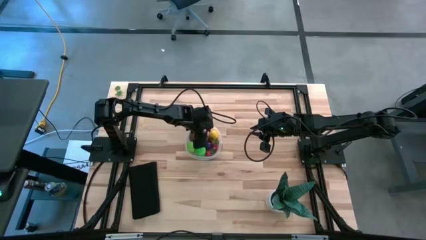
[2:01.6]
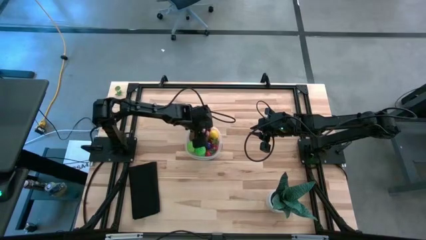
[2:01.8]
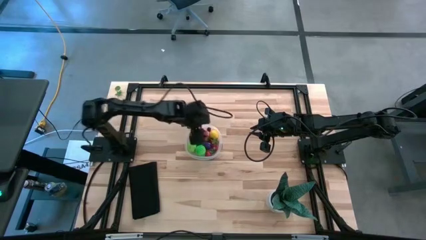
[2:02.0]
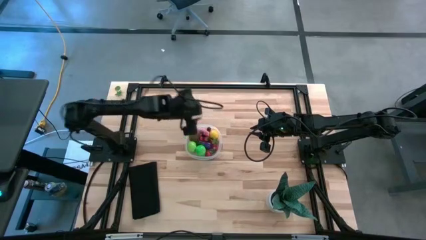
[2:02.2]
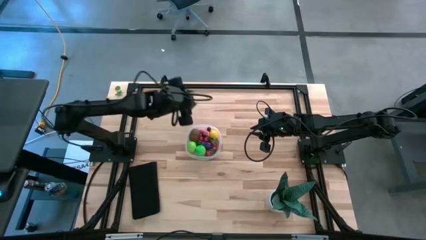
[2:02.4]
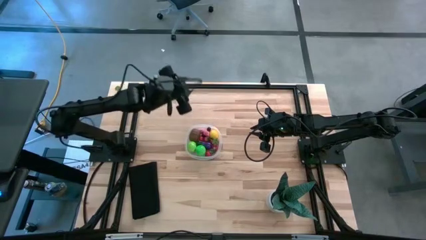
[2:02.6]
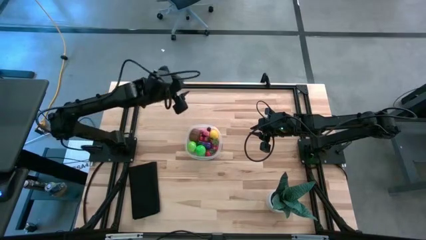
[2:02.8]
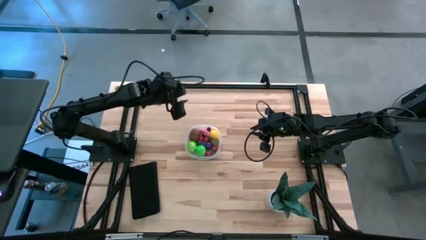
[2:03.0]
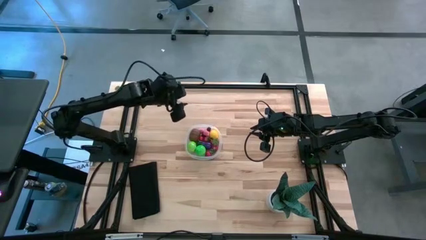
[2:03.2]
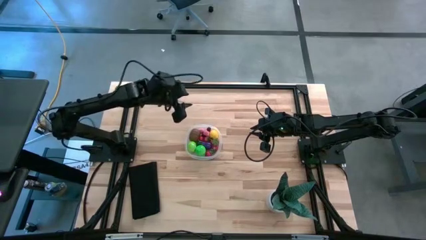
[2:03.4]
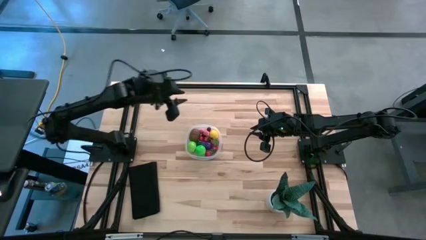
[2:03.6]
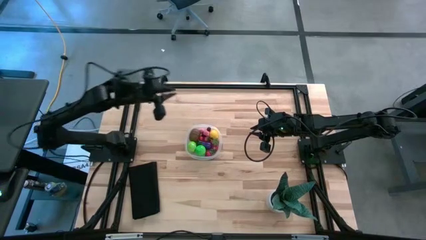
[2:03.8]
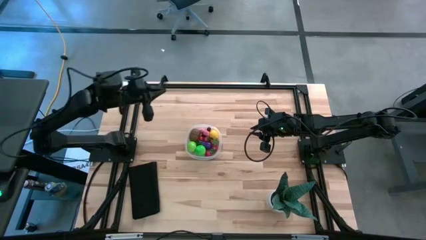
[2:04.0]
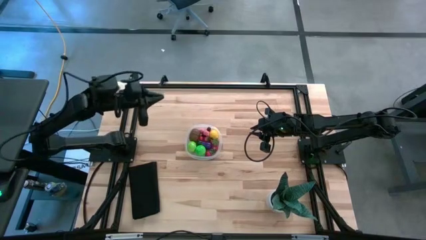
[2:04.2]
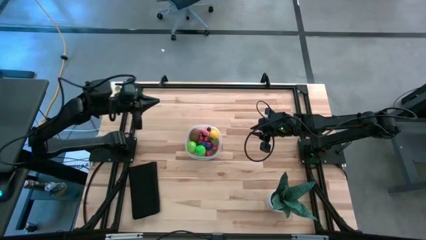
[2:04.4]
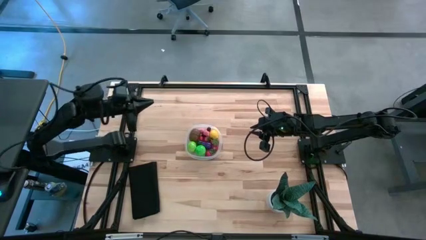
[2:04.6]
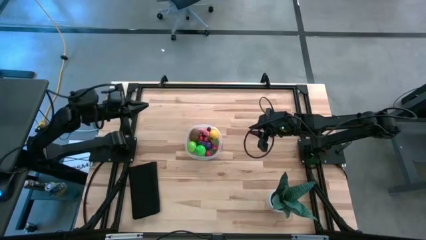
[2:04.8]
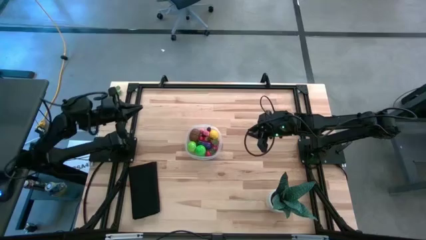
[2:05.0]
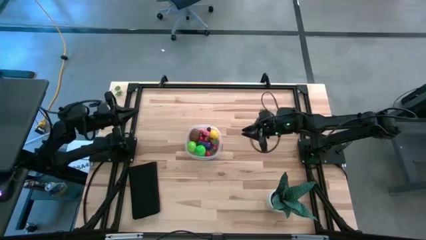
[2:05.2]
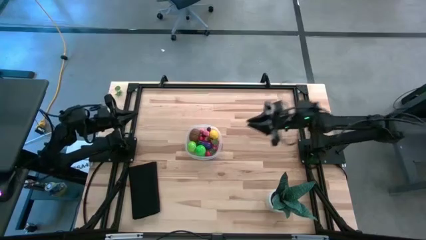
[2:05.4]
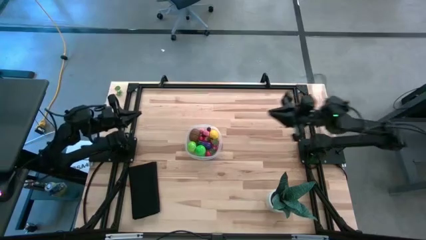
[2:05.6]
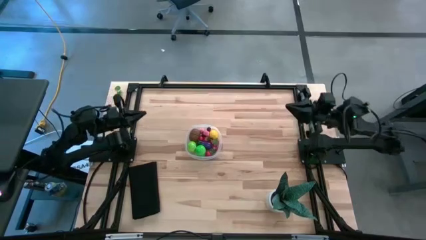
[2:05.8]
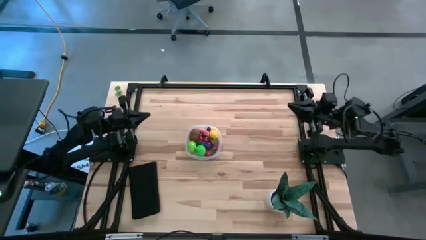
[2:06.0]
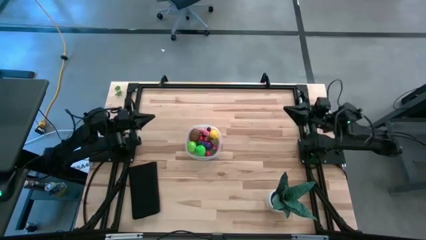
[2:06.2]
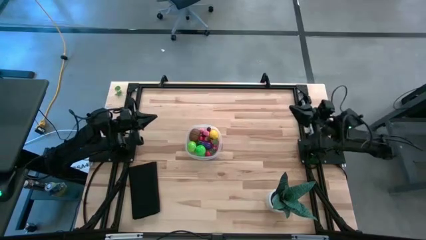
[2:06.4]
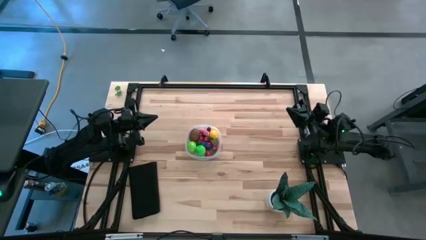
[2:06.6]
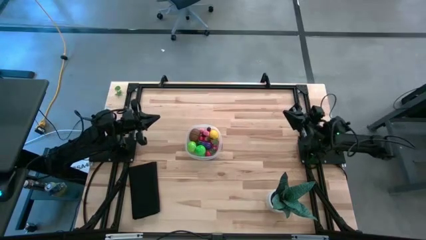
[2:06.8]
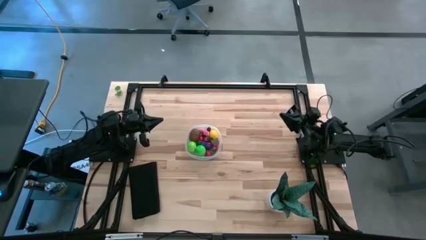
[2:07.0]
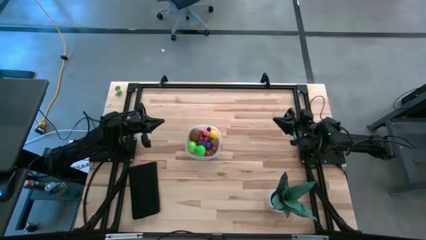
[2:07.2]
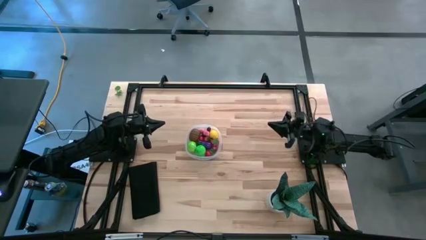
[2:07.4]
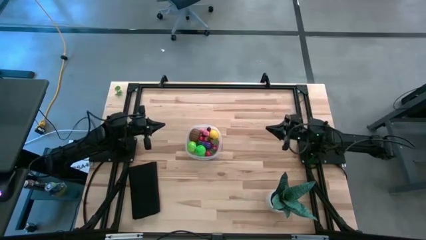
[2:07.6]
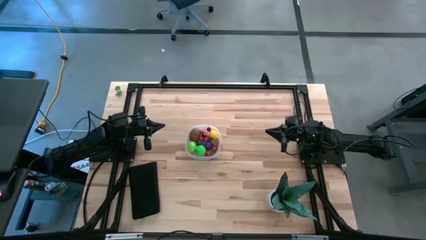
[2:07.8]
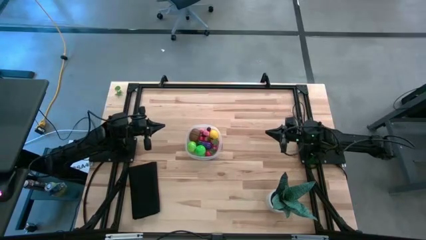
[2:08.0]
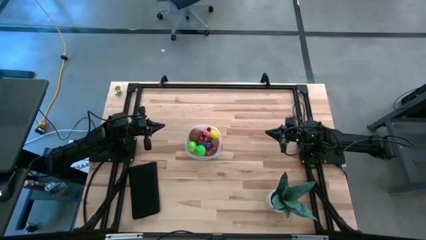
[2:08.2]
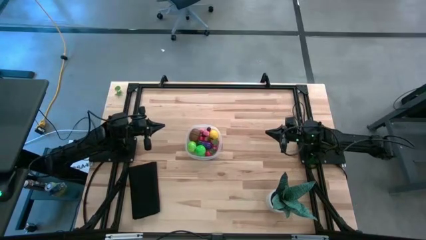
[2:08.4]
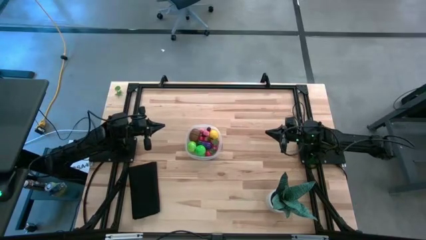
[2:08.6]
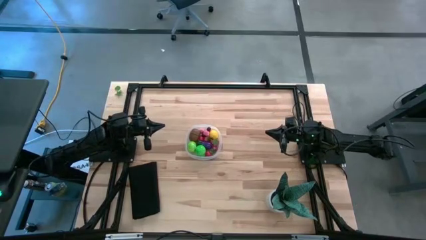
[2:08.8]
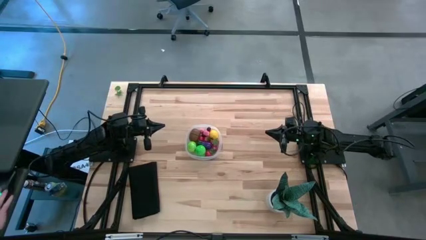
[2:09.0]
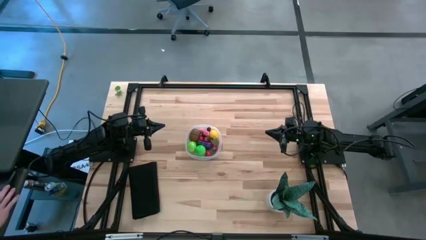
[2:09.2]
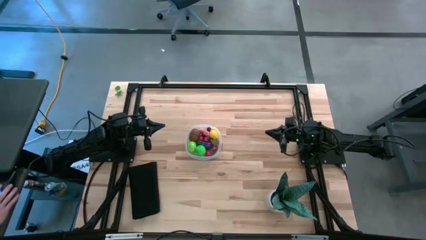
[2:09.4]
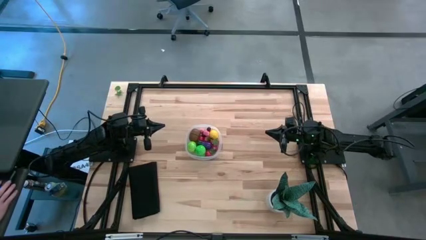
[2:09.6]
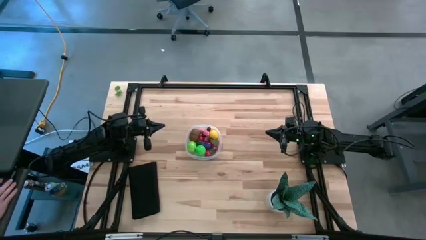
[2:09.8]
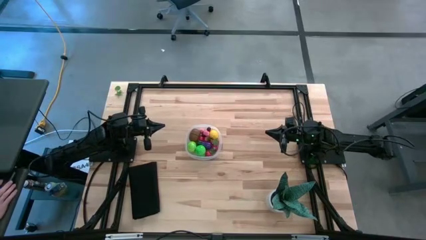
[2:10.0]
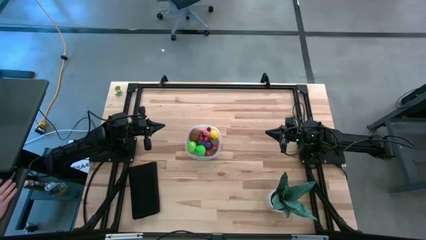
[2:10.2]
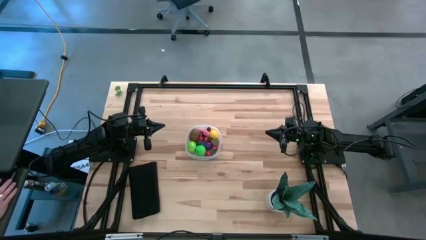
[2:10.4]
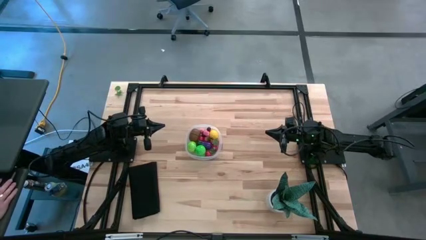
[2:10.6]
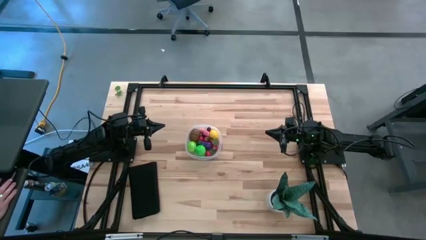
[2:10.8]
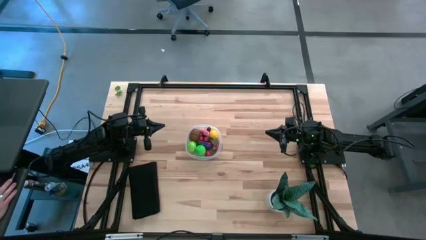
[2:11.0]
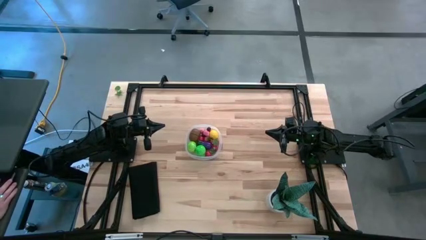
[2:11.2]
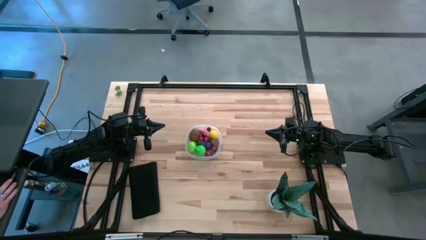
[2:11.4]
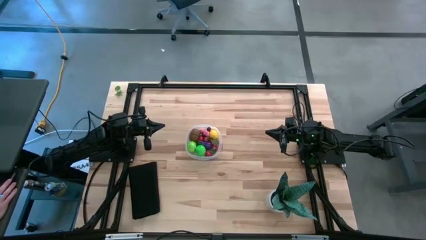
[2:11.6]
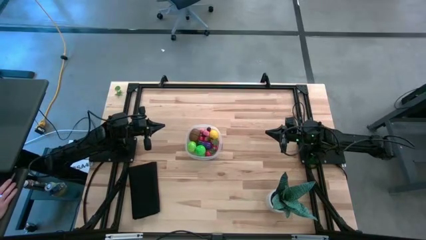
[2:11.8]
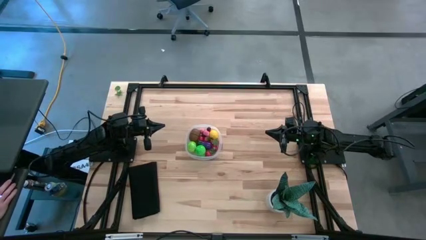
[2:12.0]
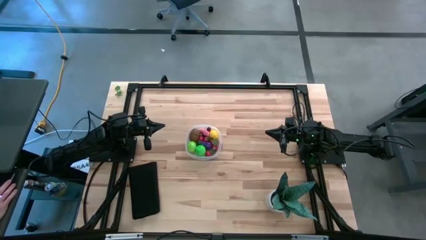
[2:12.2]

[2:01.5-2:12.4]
Task: Pick and placing Produce into tupperware
Return to Home Position

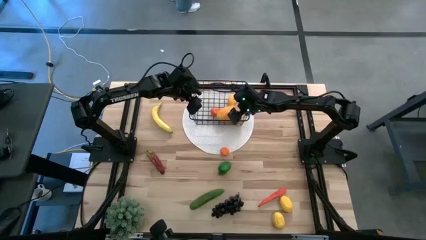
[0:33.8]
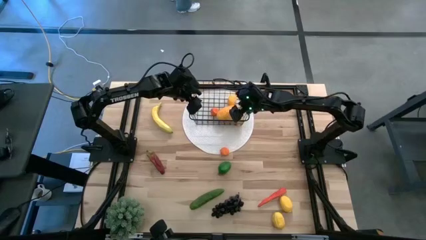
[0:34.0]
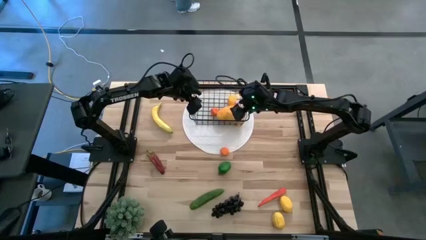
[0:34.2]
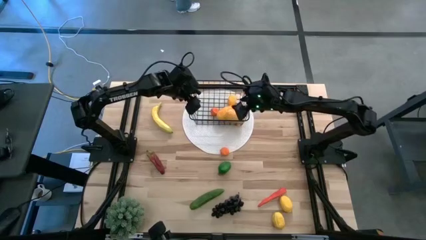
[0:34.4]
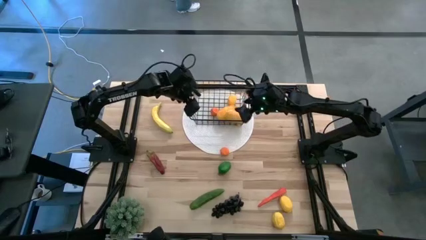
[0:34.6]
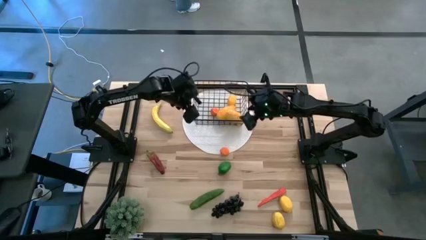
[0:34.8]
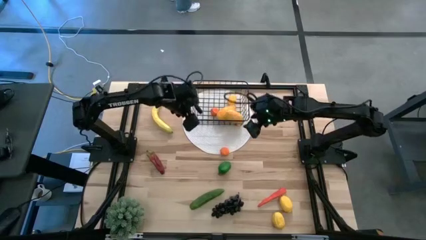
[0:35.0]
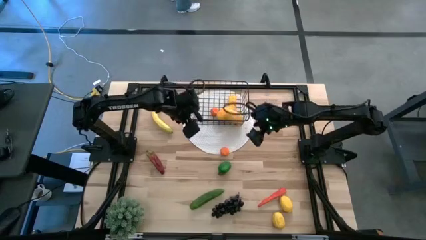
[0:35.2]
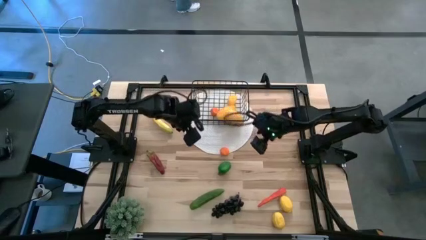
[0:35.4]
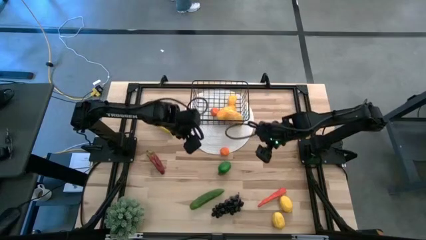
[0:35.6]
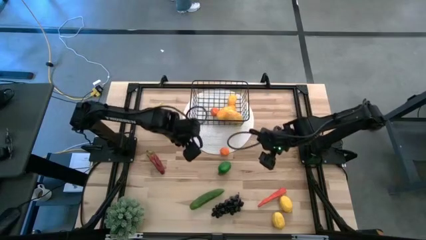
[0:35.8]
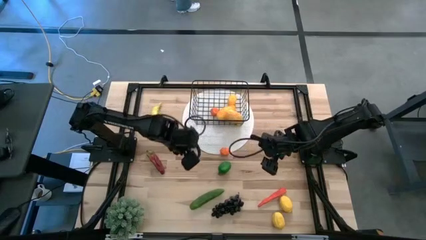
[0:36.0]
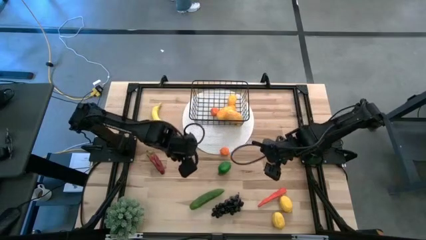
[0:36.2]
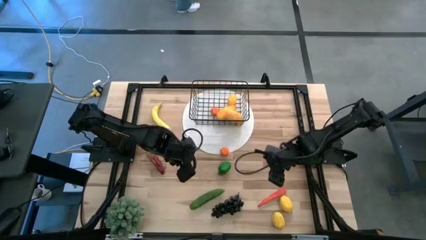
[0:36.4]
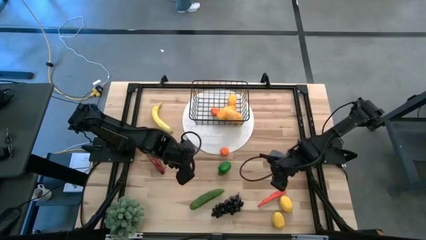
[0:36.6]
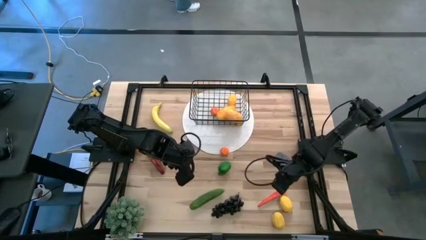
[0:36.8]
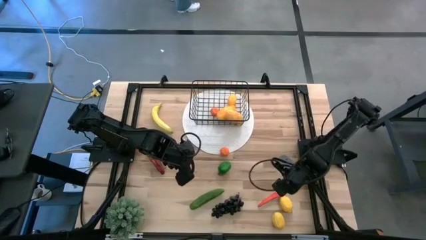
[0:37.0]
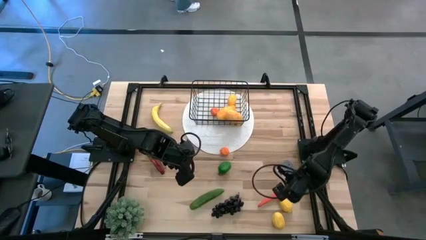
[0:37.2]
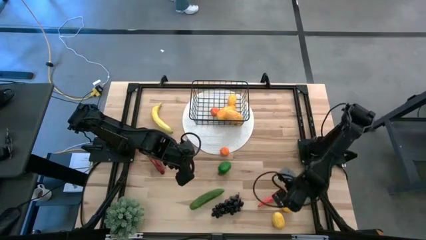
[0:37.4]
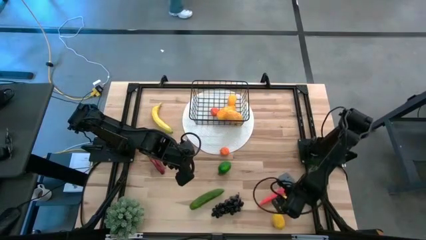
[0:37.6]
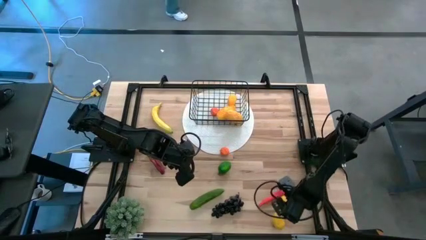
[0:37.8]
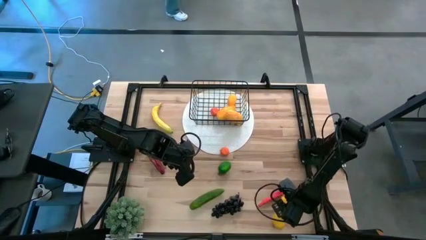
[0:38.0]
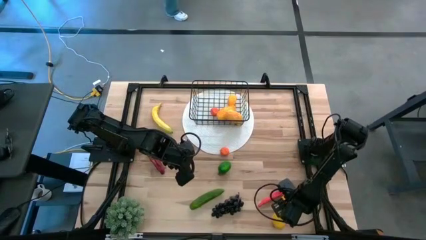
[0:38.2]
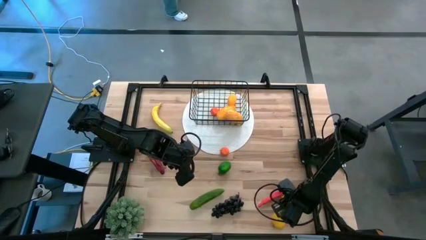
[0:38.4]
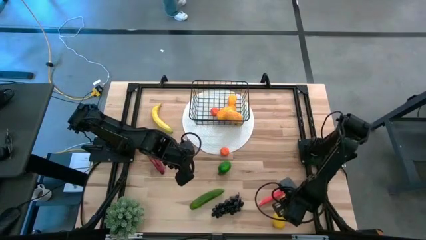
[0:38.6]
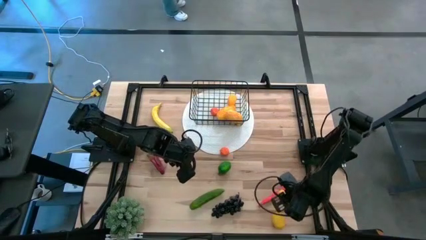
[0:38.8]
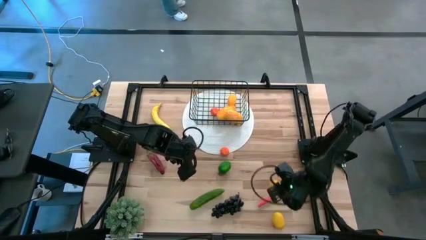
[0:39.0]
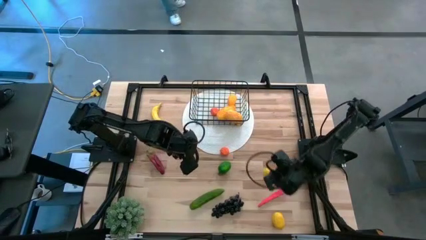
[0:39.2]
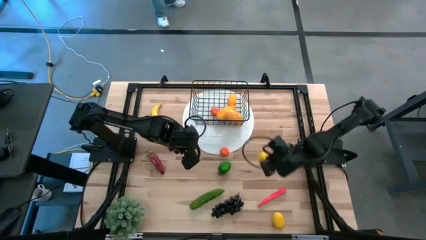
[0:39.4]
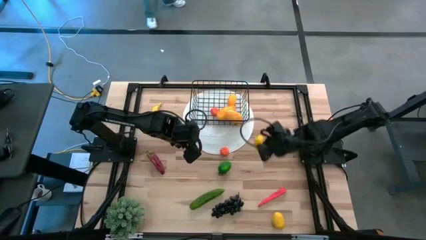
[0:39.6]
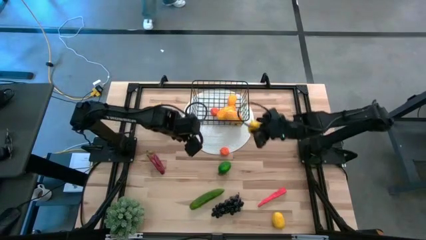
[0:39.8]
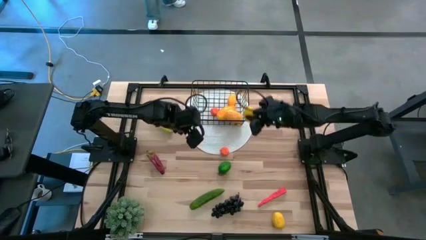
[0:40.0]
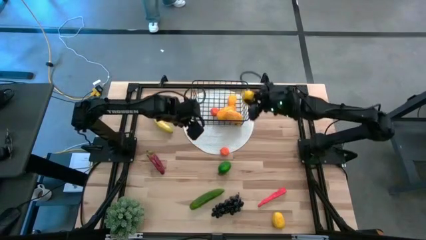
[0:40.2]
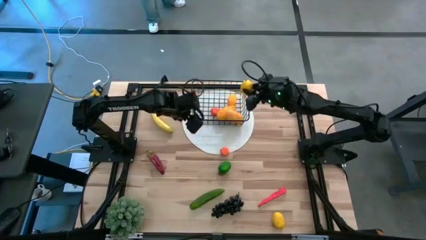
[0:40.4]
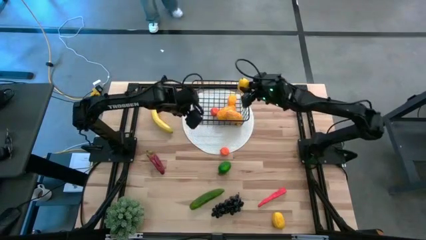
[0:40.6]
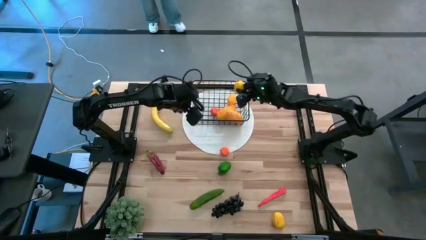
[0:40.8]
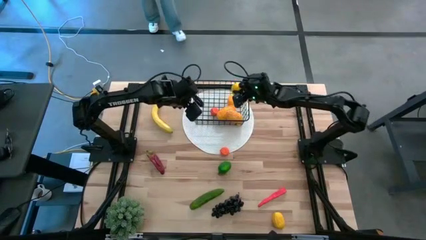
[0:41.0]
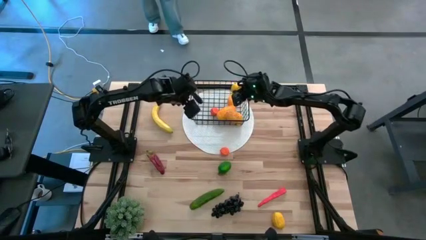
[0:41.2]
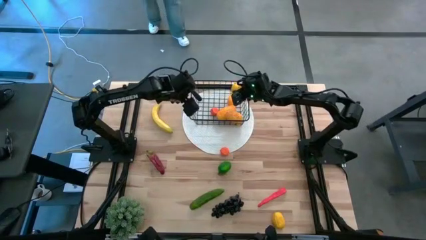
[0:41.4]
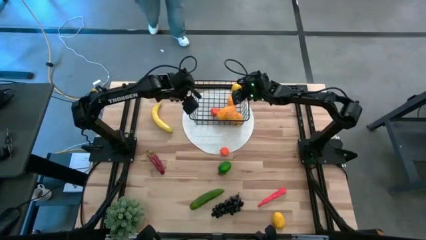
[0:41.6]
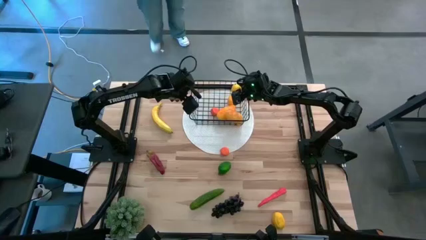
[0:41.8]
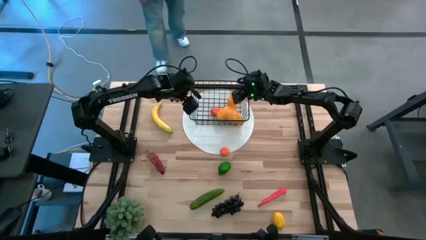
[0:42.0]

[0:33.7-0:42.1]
Task: Build produce basket
Put the top lemon into the wire basket
